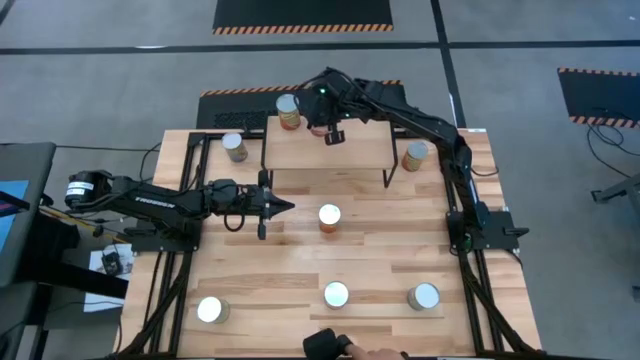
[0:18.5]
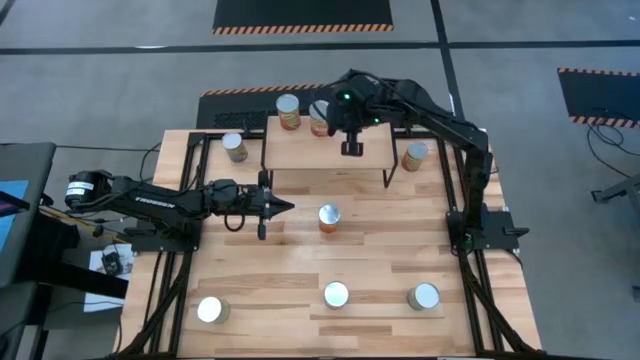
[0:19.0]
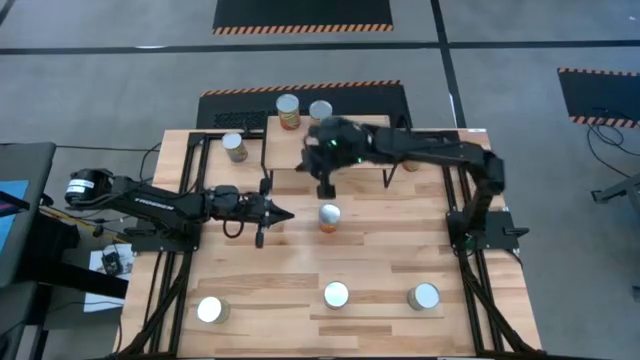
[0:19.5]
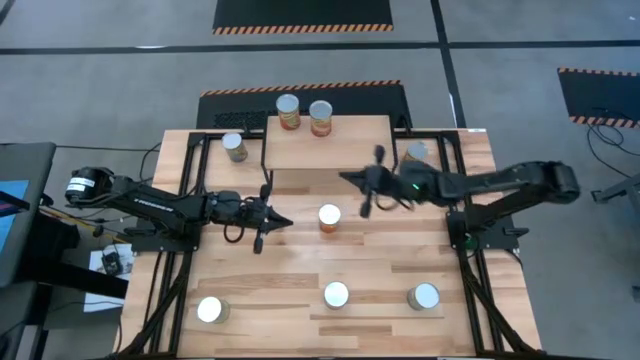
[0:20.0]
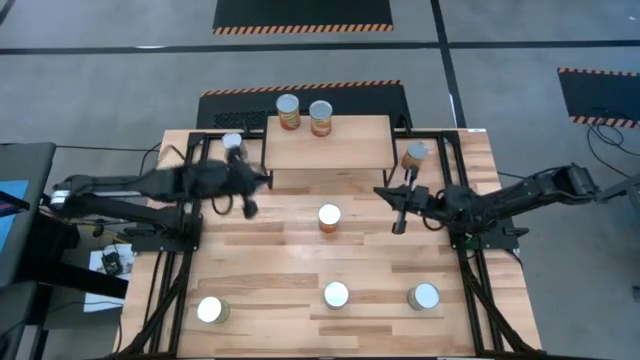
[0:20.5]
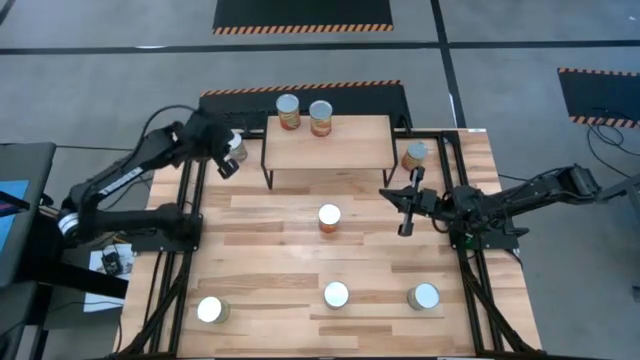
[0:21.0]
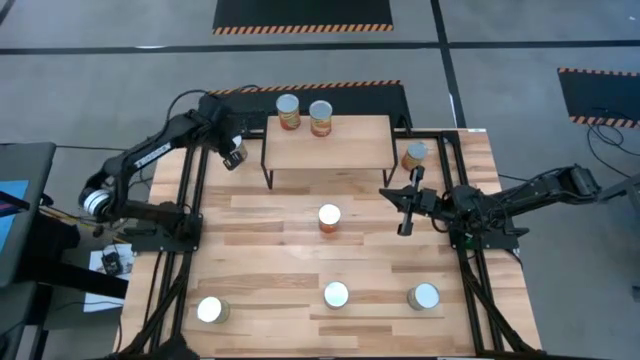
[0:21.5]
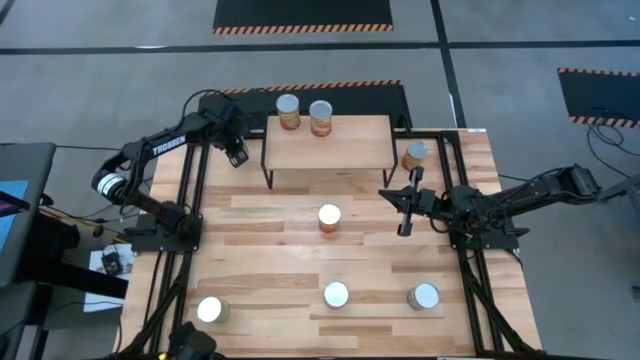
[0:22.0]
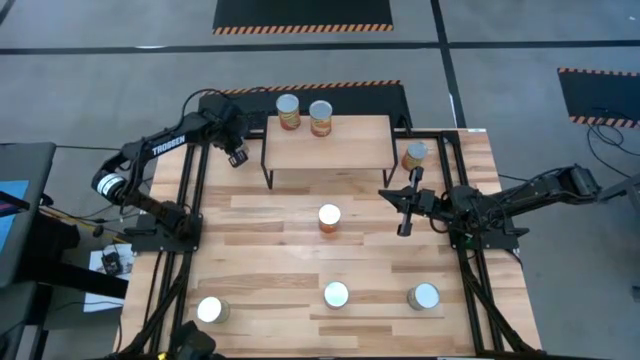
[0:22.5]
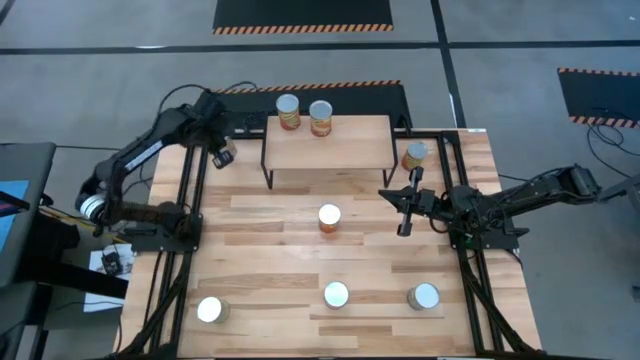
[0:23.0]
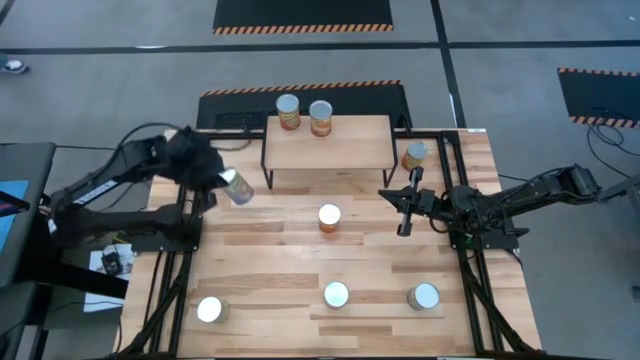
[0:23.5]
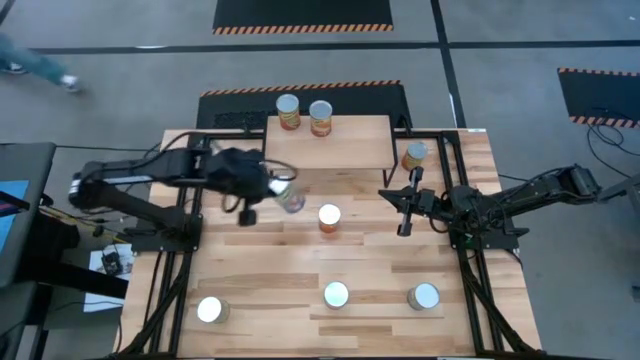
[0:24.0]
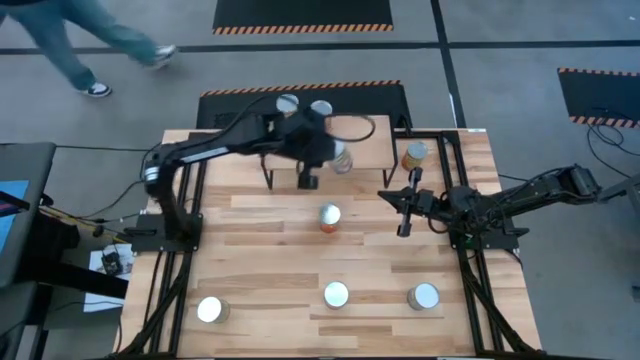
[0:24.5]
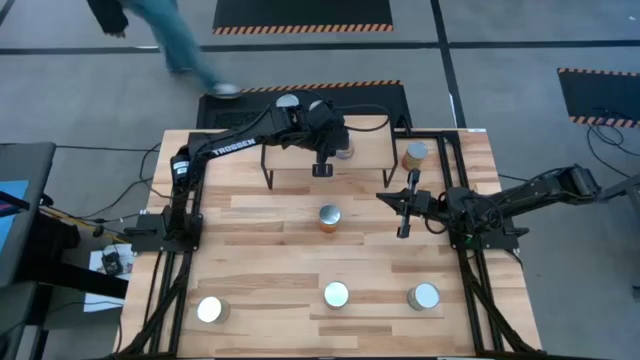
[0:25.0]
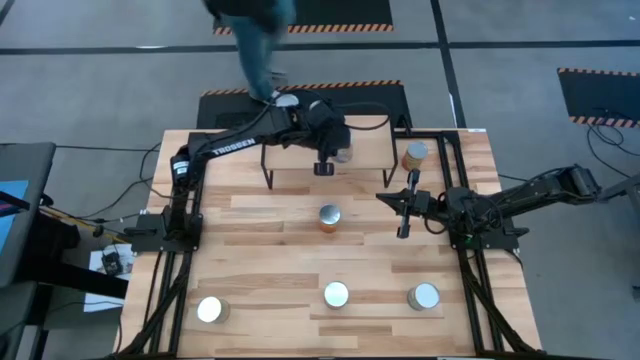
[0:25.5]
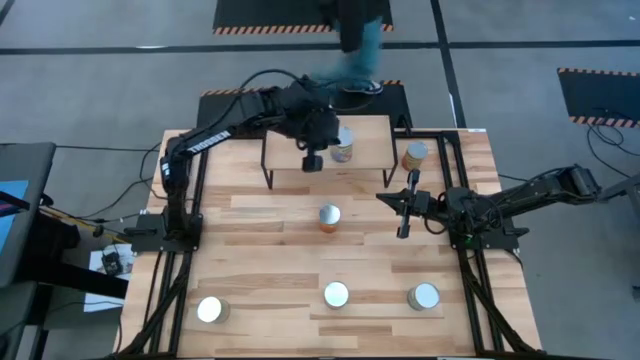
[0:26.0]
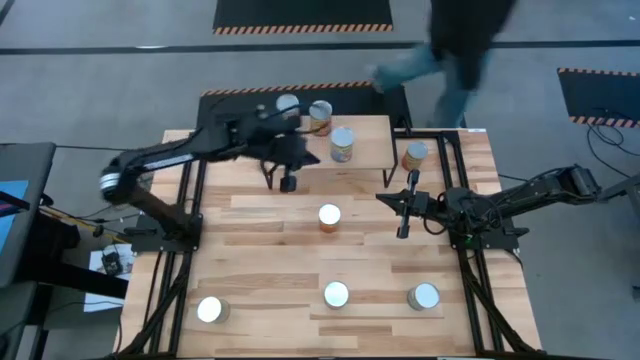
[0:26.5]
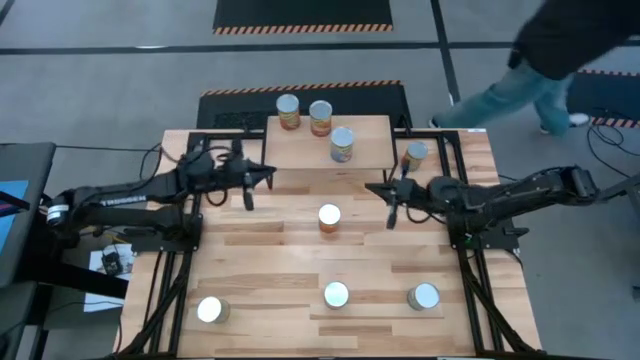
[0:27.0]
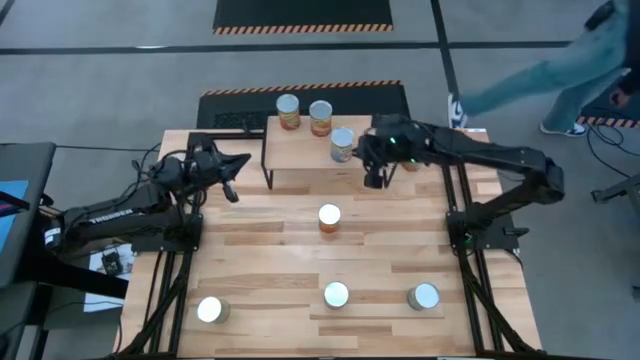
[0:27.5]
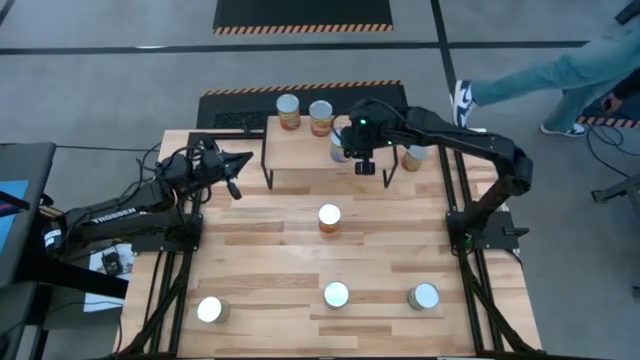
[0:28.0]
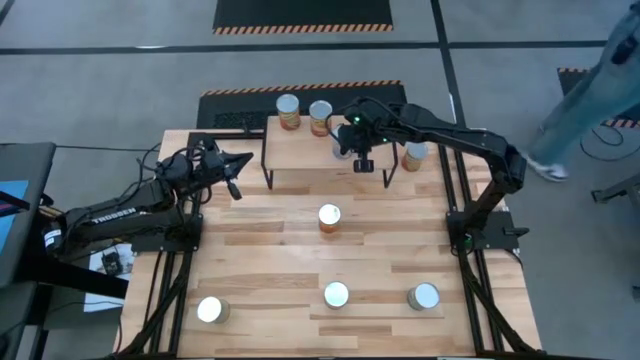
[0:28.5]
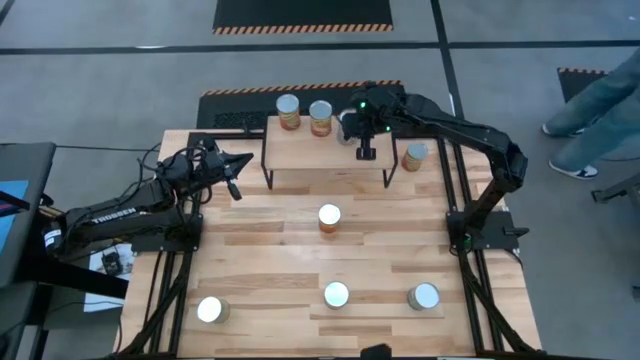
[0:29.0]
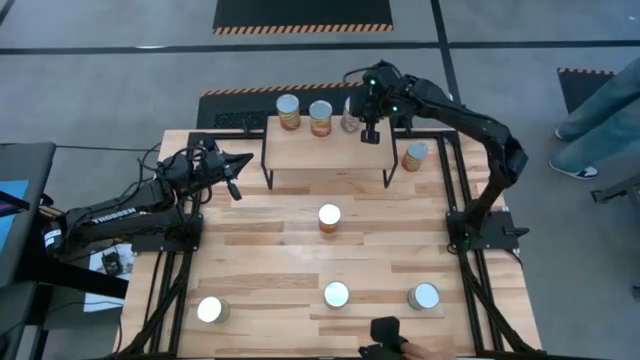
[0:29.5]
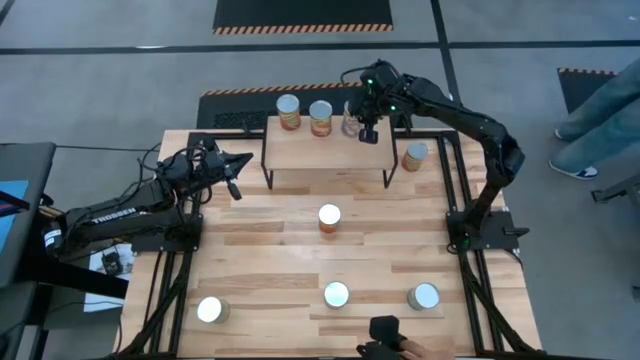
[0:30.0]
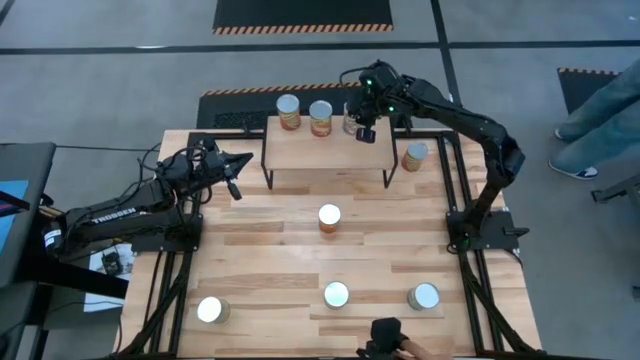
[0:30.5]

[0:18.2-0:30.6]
Task: Pick and place cans onto a shelf
Put the canned peaches on the shelf

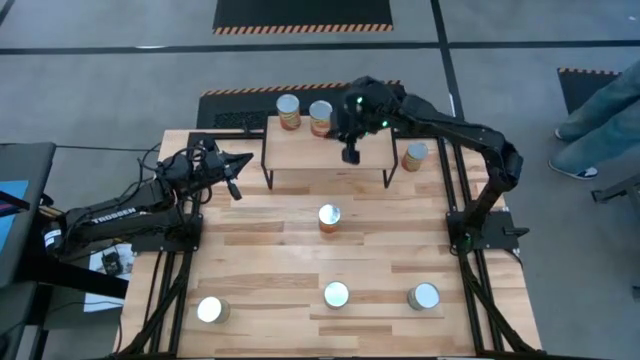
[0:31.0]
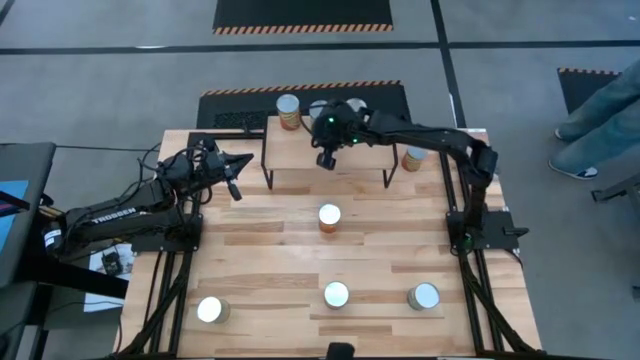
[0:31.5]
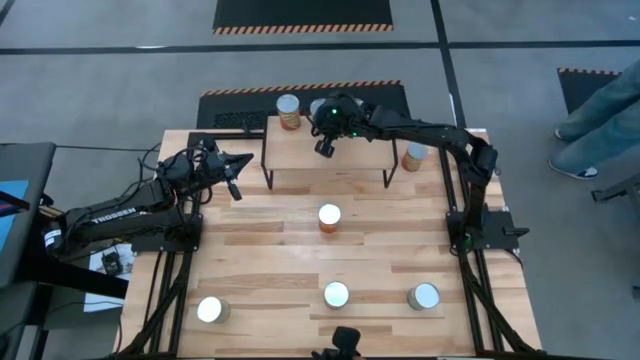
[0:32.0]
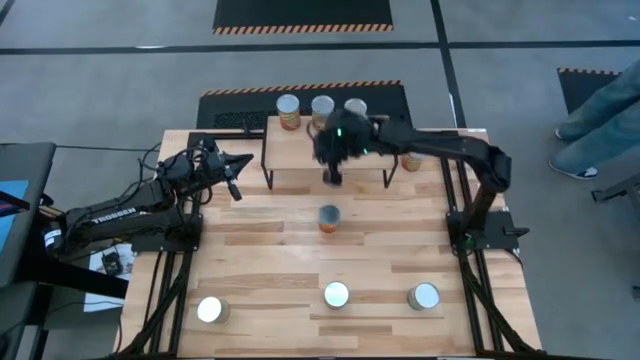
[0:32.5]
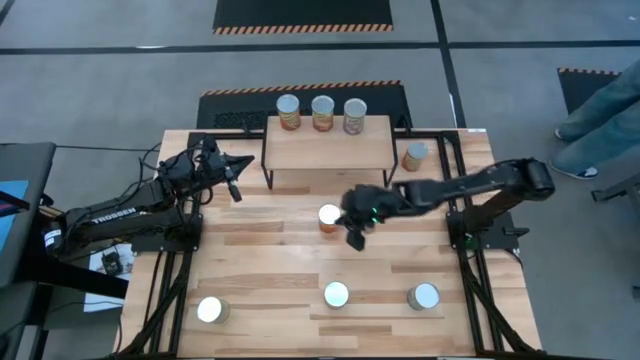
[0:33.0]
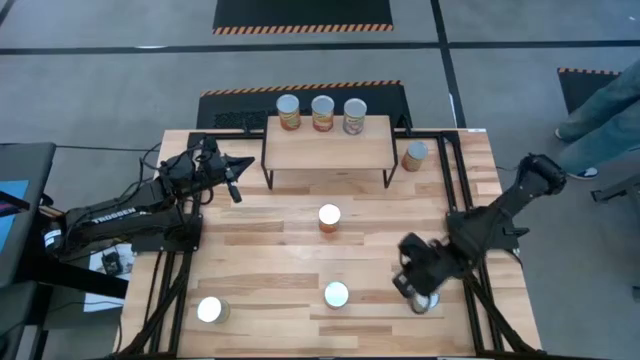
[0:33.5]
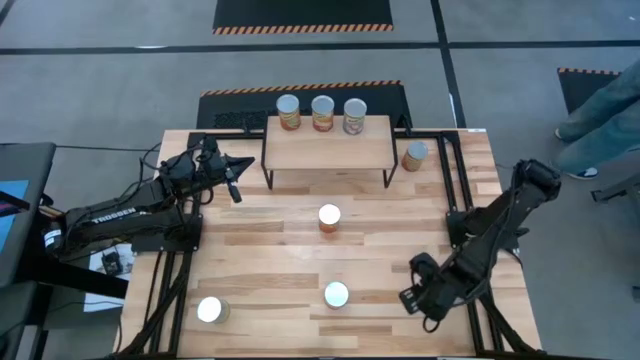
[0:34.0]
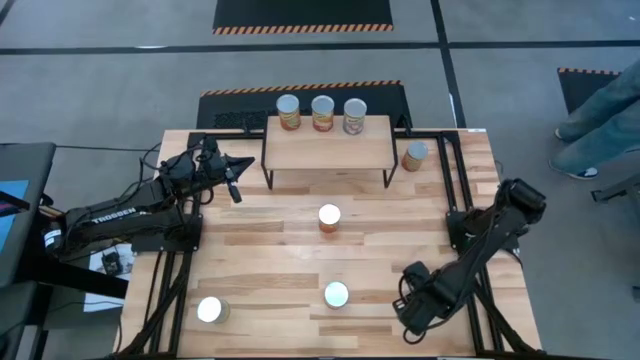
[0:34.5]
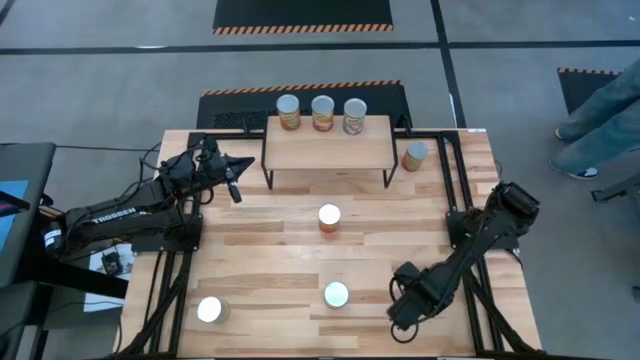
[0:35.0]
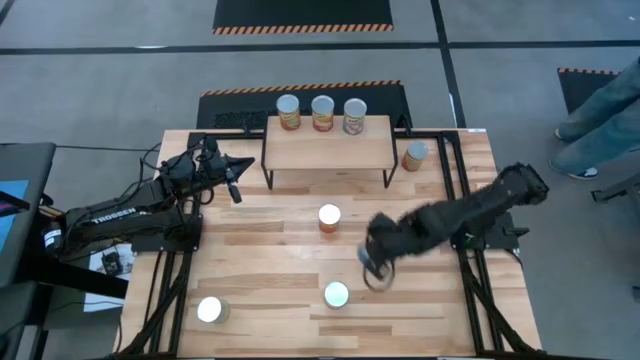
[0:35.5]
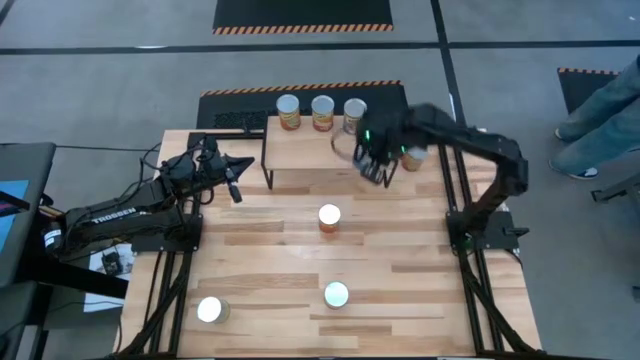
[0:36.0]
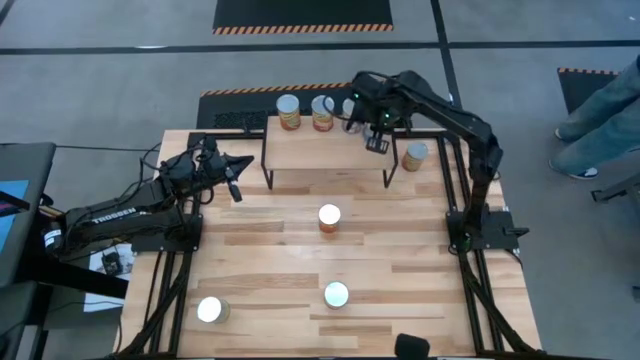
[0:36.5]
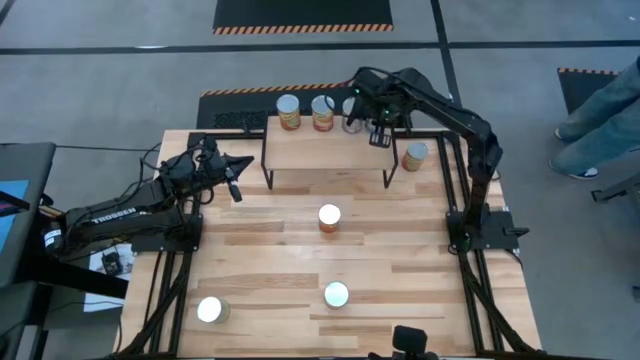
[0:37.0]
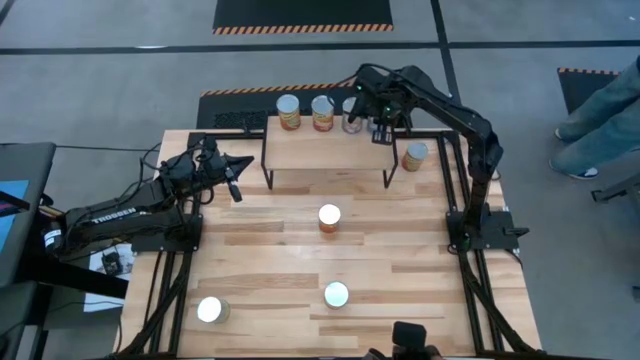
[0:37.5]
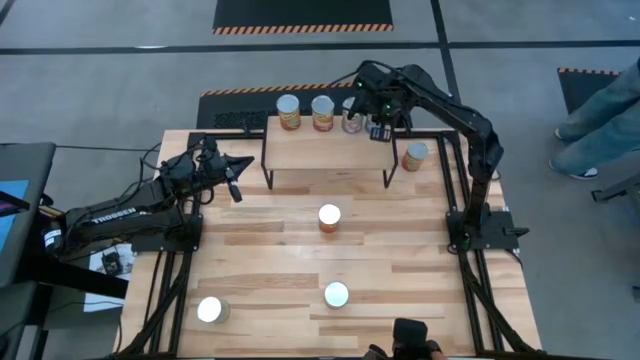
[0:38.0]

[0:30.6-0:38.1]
Put the canned peas on the shelf
